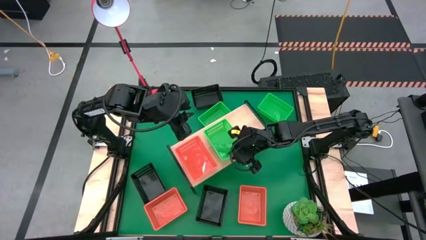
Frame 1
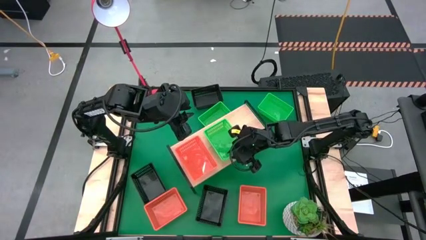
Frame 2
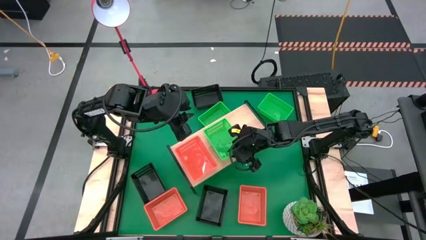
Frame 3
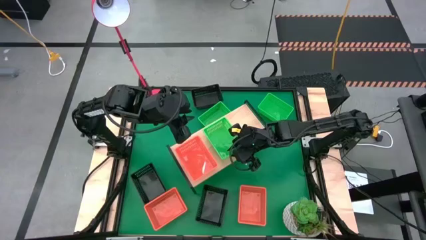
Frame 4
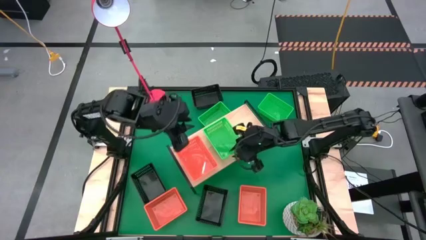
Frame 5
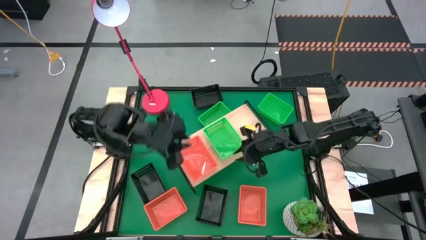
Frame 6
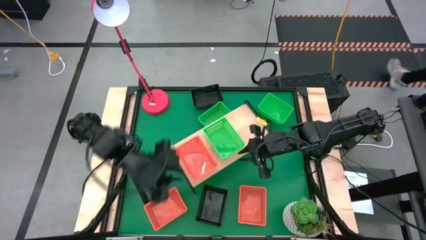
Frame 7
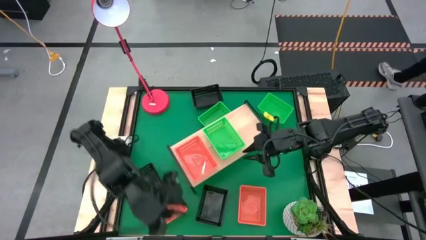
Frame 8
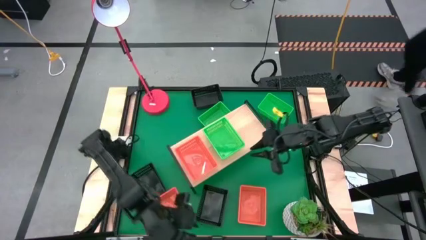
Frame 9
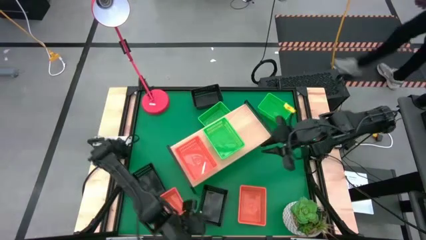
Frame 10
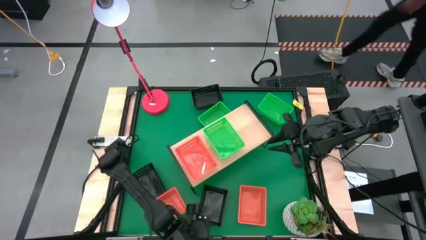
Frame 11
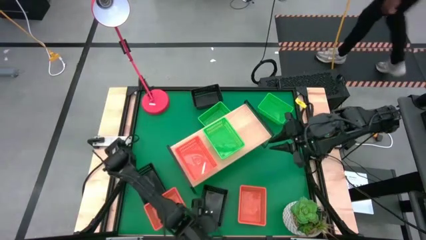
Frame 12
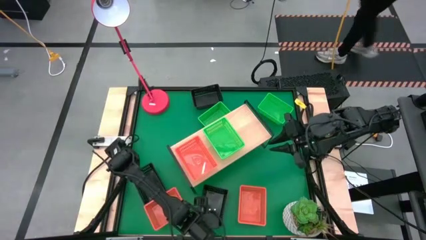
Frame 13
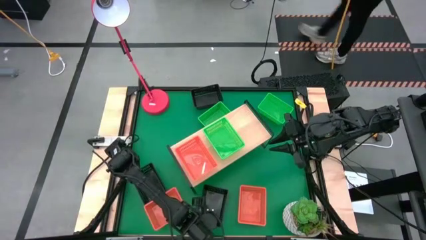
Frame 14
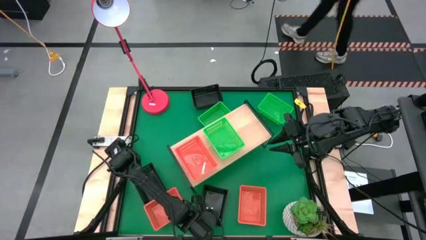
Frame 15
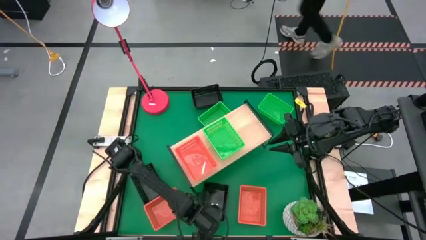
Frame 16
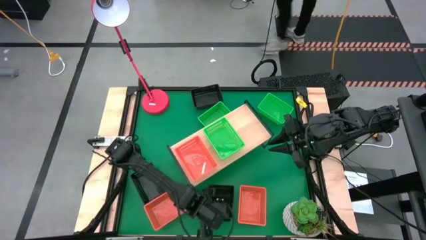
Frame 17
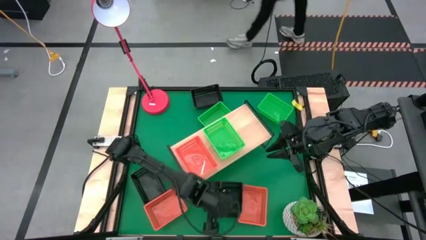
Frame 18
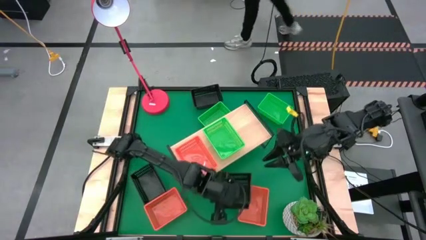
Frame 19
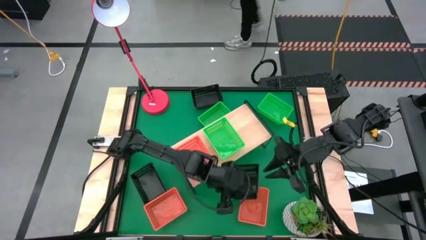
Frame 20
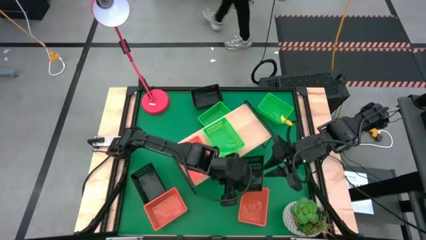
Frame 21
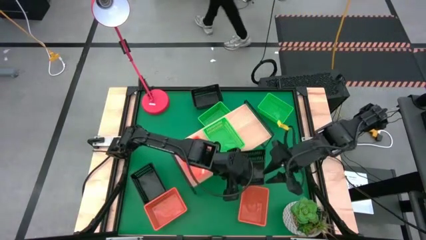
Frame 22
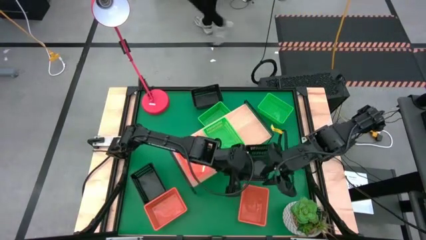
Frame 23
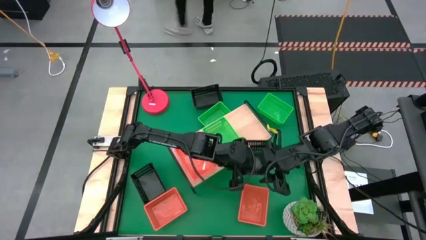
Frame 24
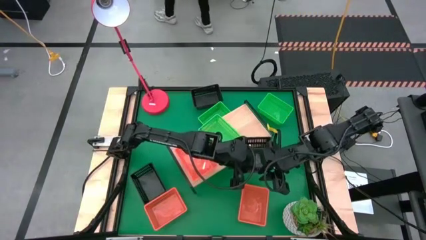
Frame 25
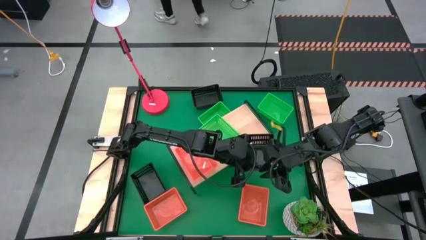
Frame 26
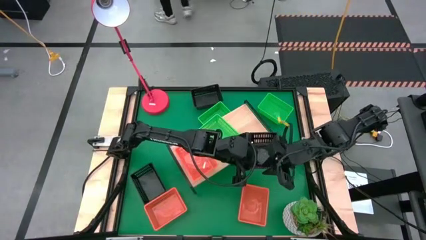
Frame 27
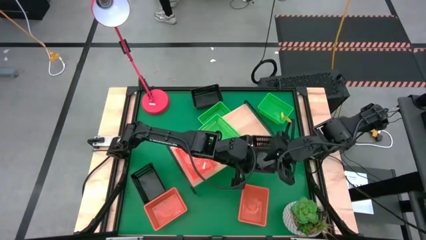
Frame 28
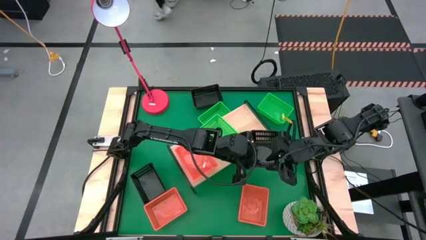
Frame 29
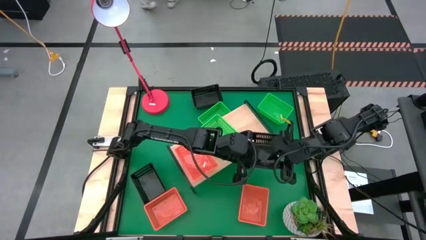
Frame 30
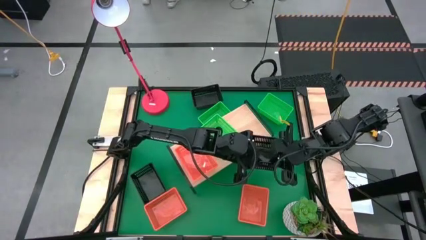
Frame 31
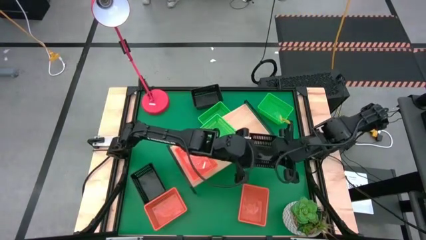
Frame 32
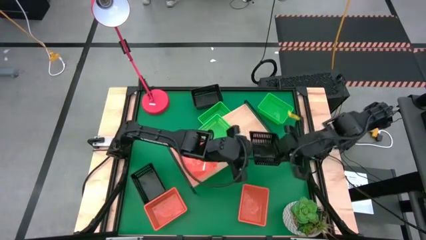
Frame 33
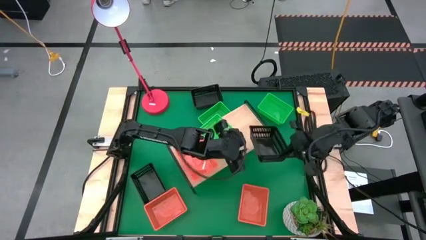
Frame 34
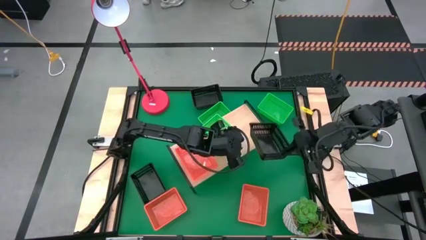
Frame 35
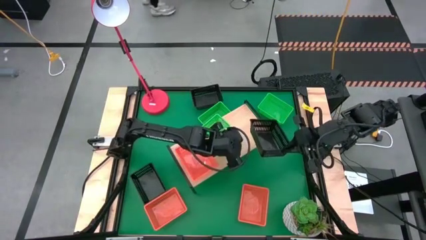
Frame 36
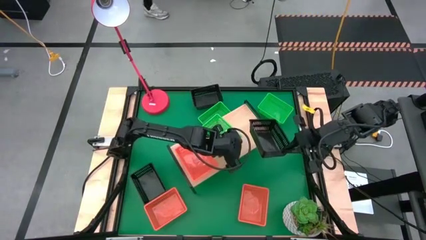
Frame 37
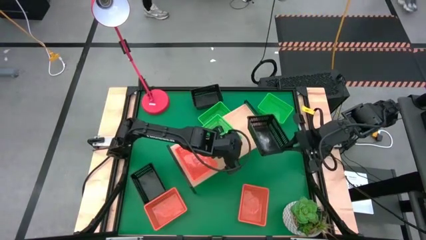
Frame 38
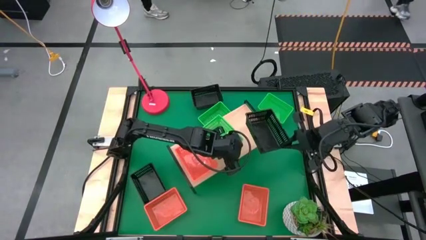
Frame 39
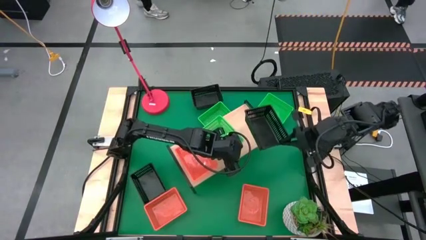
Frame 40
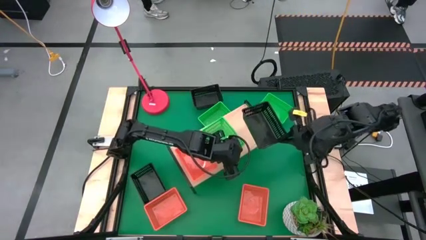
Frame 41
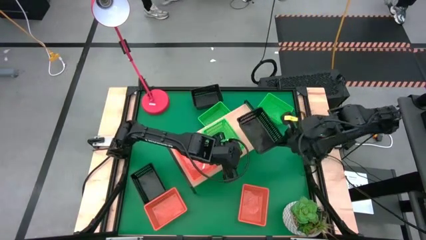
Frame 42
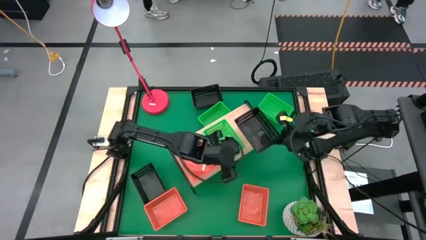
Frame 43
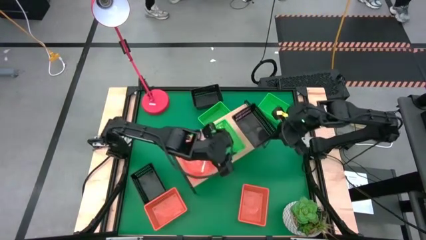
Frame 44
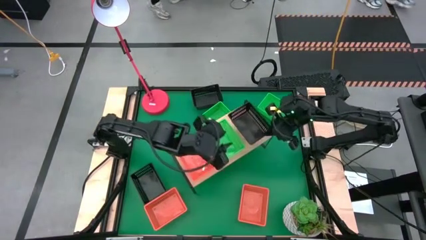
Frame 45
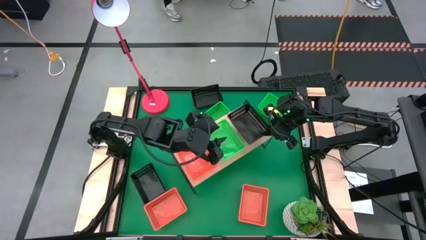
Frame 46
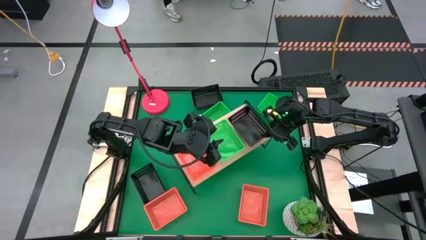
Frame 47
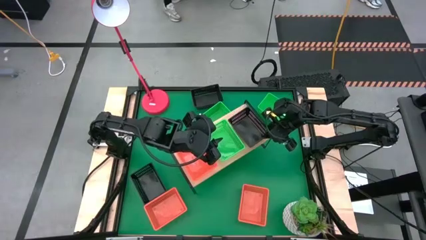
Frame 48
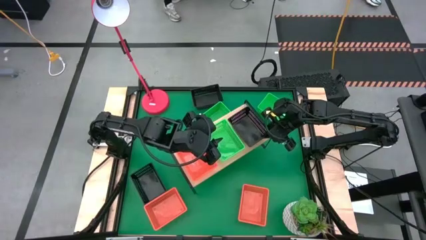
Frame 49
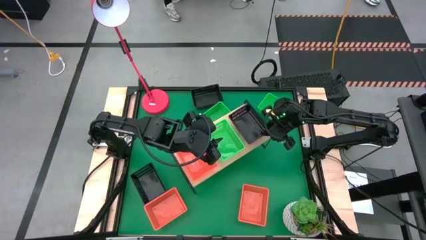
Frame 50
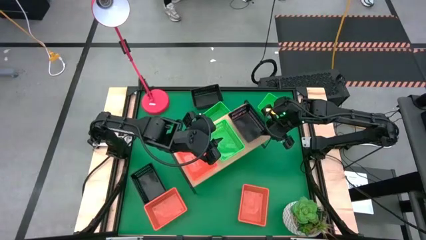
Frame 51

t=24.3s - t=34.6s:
Task: Stack baskets on shelf by color
Put the bottom right black bin on the shelf

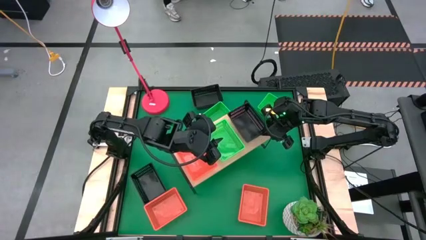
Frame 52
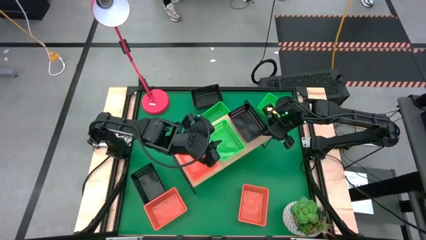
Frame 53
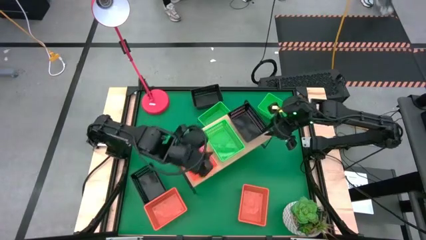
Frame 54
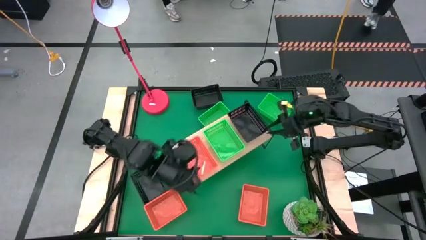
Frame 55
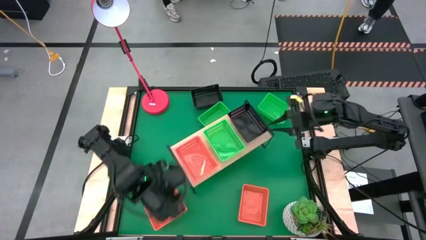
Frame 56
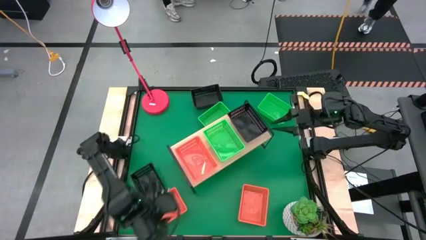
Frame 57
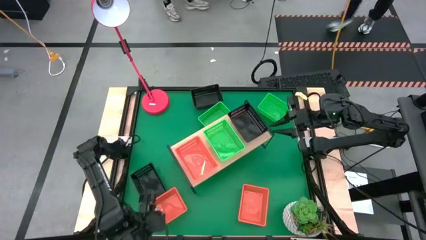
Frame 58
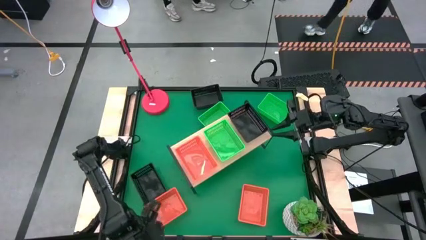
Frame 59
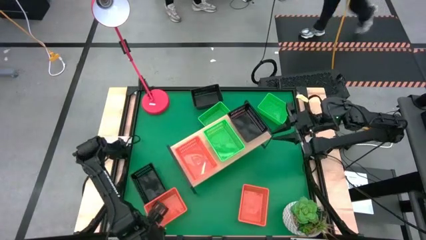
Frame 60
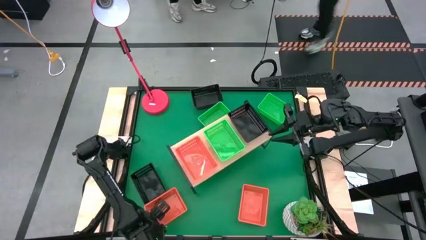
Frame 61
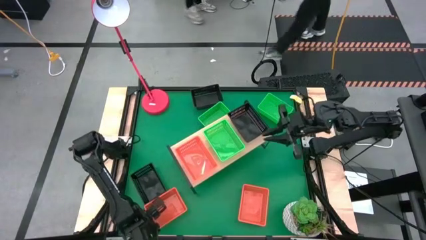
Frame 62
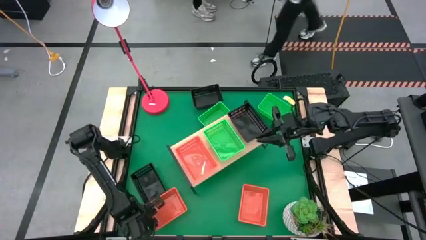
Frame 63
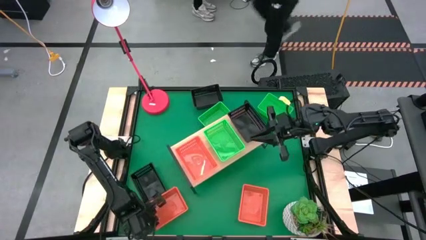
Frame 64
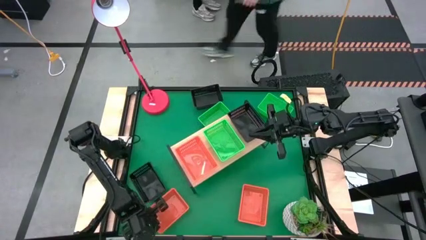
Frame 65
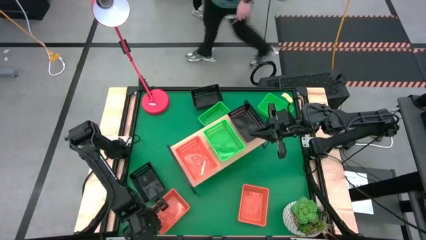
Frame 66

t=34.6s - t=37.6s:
Stack the left orange bin on top of the orange bin on the shelf

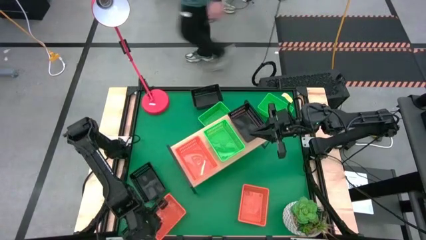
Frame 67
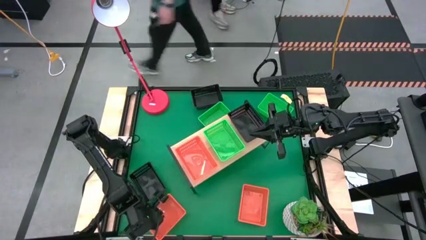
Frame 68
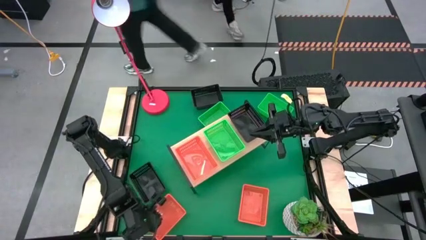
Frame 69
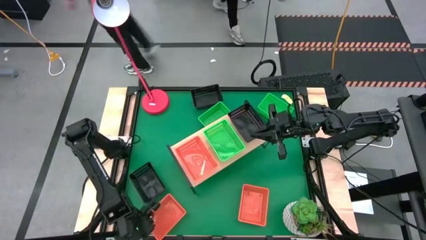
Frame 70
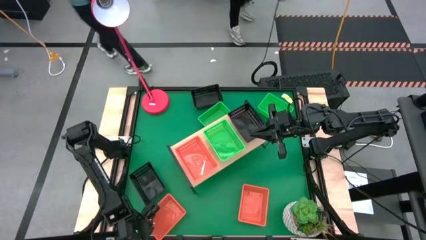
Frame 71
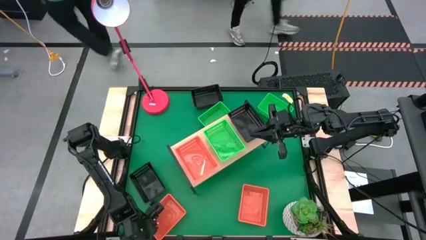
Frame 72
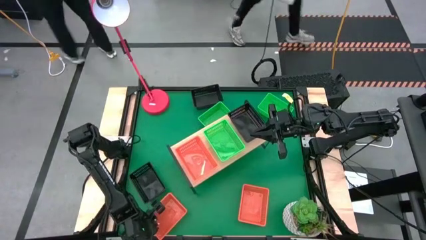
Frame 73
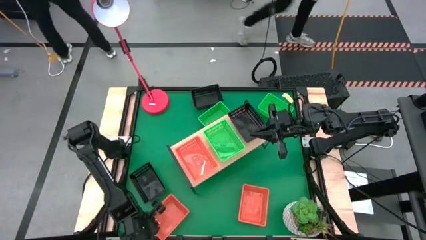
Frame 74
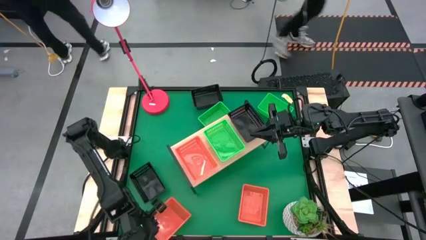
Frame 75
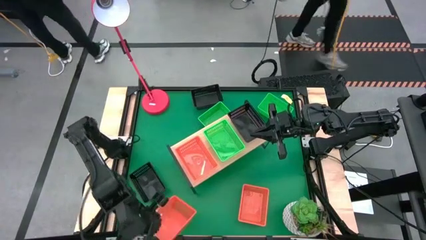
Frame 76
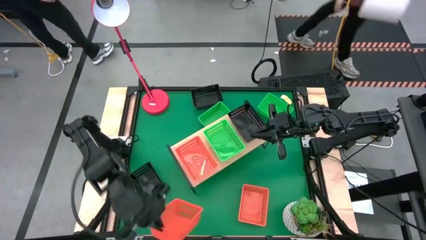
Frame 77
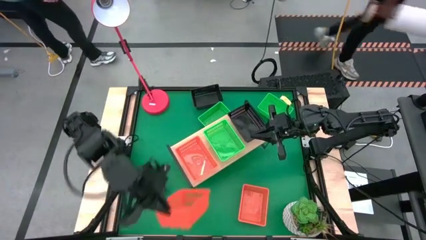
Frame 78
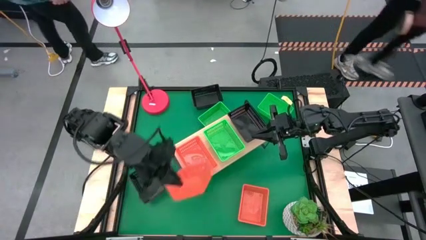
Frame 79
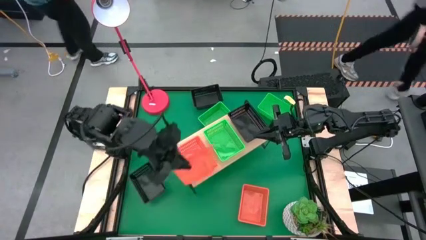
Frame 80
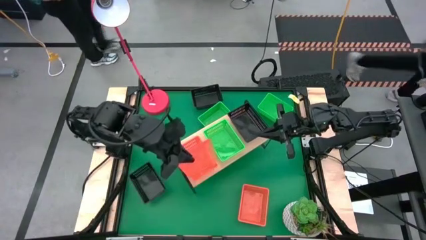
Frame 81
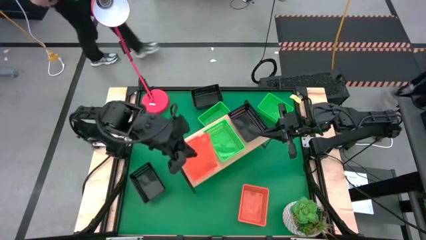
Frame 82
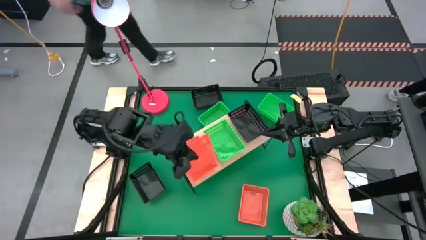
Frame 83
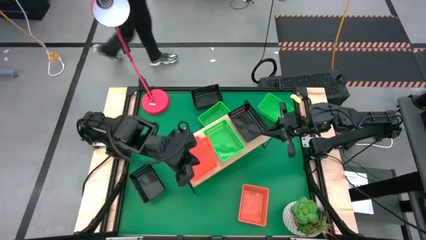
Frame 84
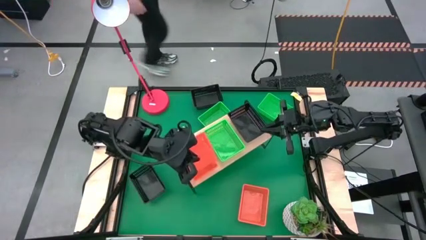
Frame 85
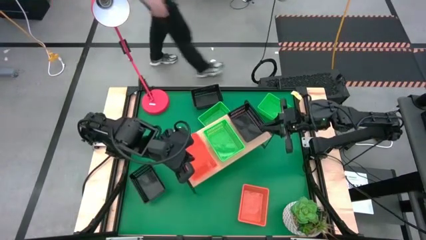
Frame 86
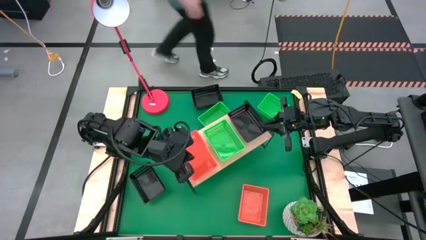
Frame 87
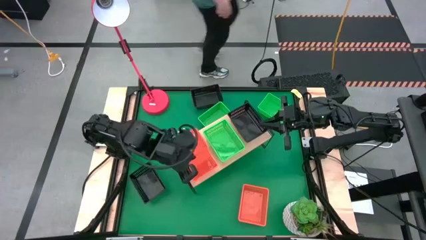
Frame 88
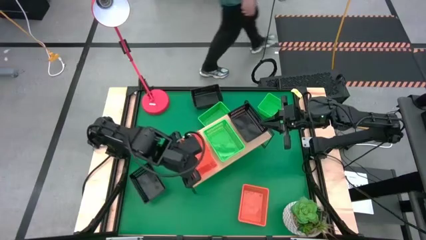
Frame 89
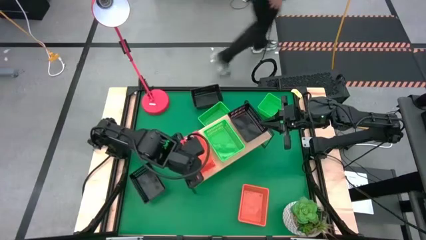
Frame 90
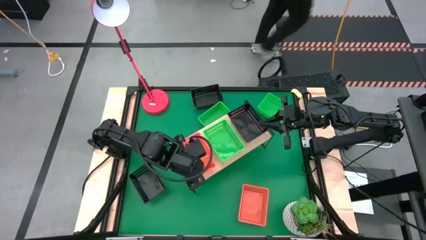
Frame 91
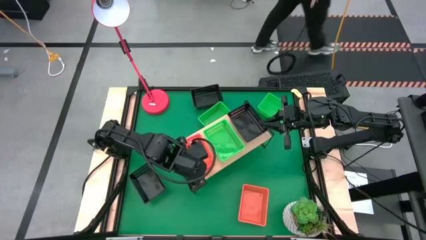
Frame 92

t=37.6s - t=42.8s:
Stack the left orange bin on top of the orange bin on the shelf
